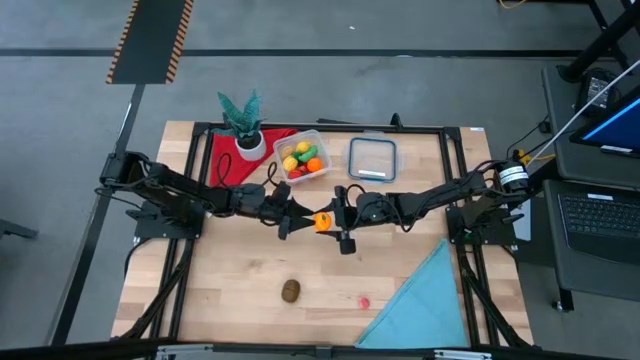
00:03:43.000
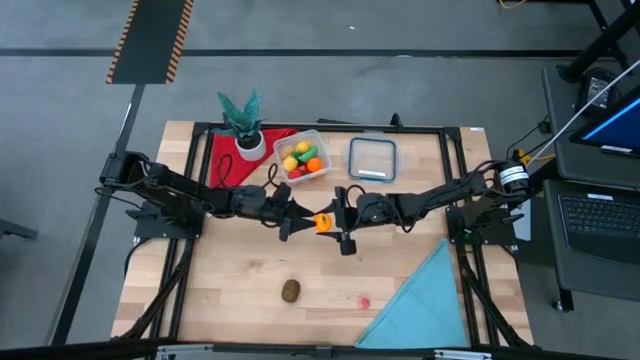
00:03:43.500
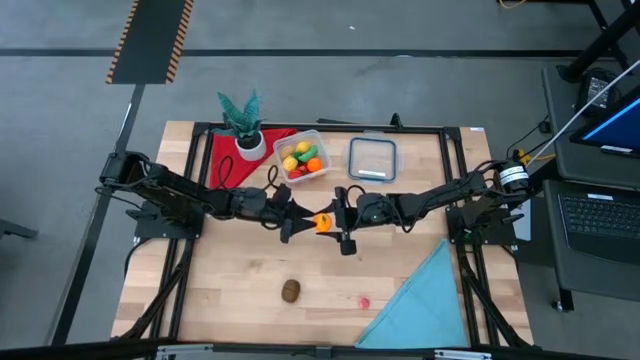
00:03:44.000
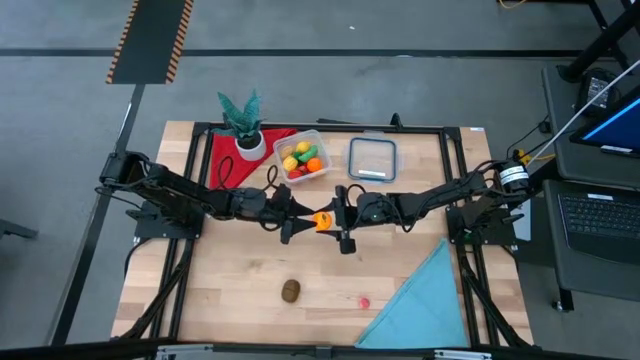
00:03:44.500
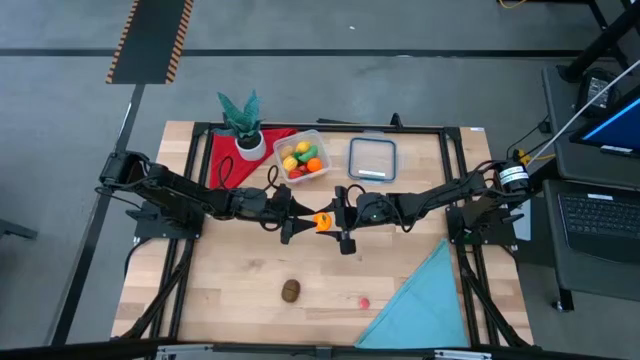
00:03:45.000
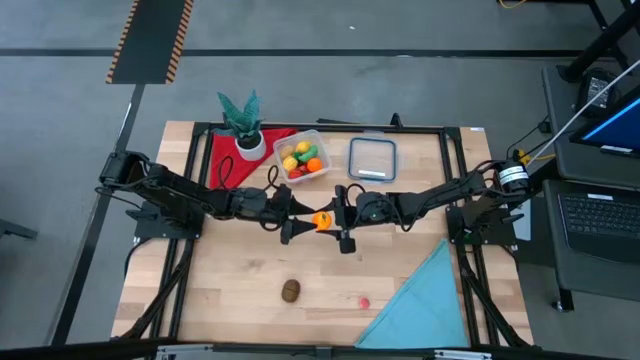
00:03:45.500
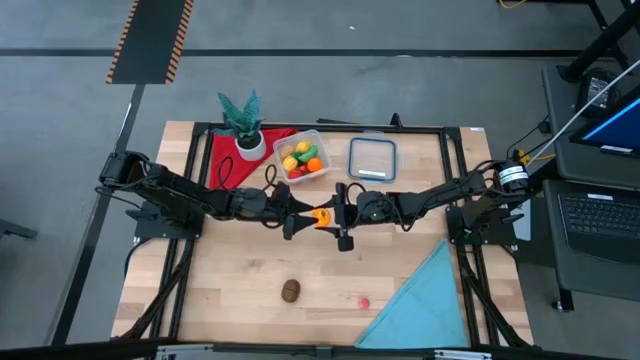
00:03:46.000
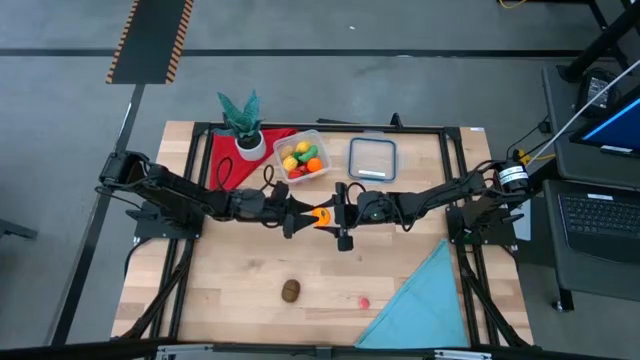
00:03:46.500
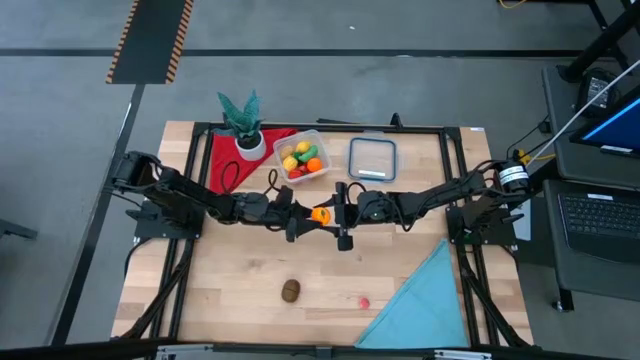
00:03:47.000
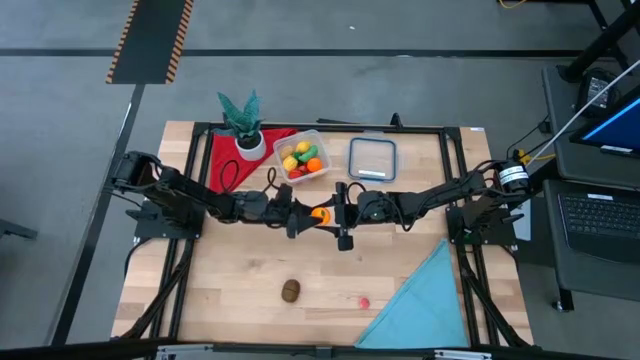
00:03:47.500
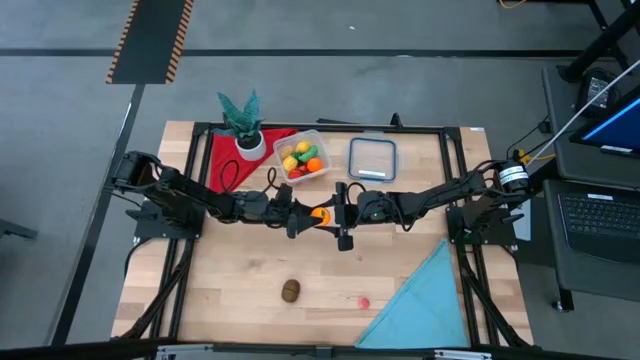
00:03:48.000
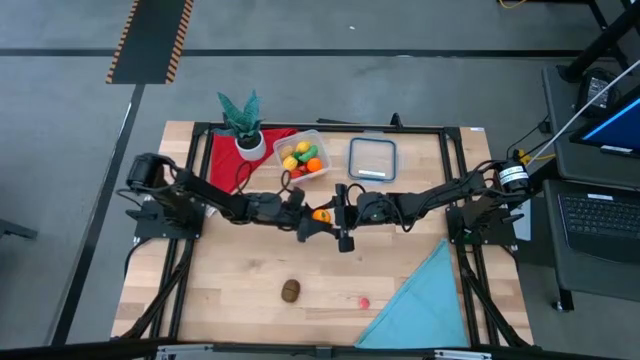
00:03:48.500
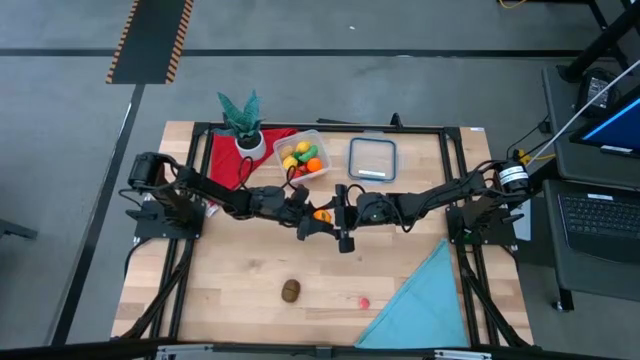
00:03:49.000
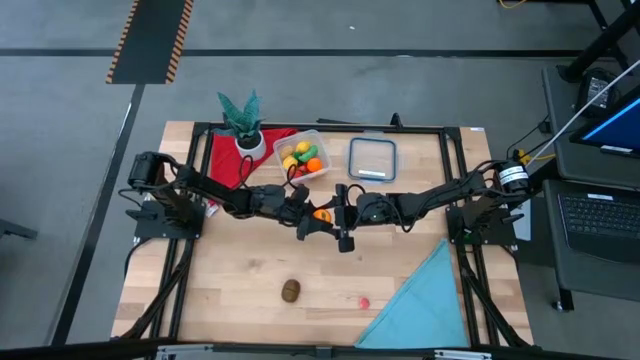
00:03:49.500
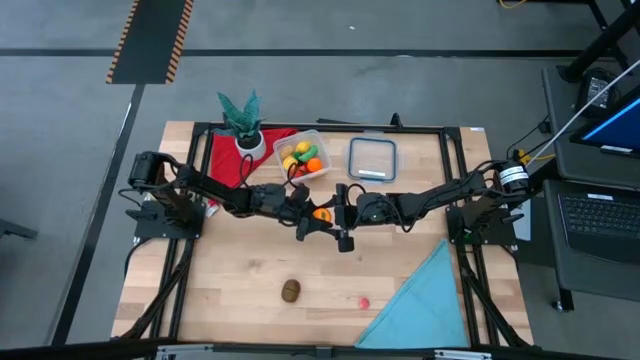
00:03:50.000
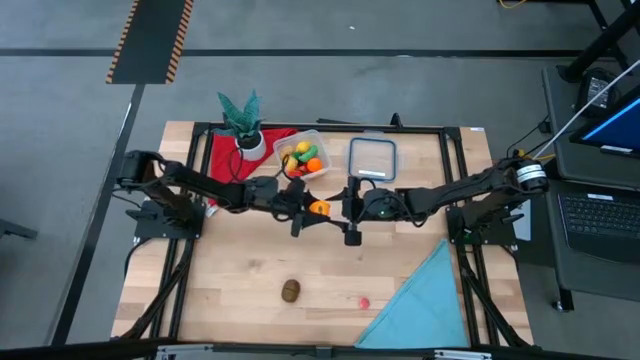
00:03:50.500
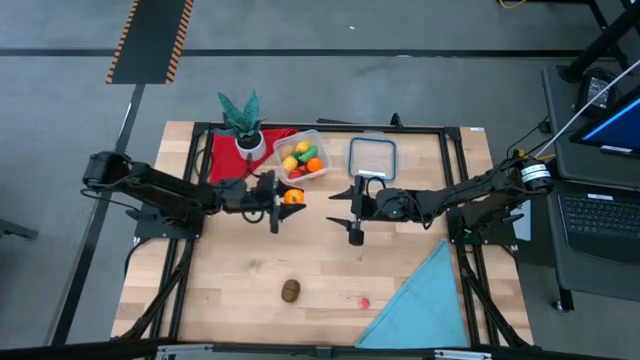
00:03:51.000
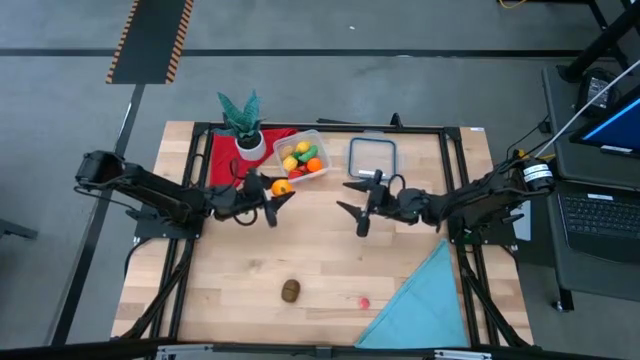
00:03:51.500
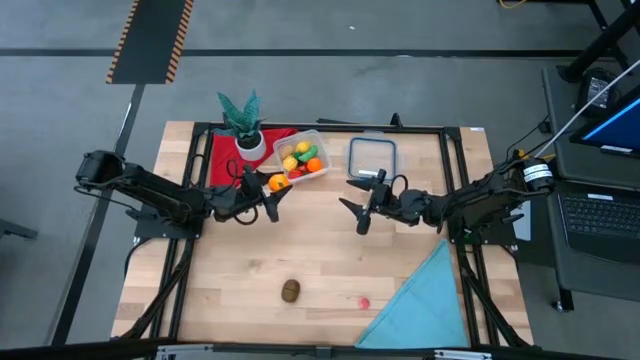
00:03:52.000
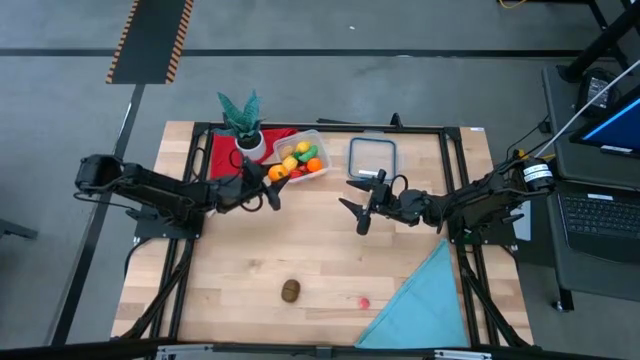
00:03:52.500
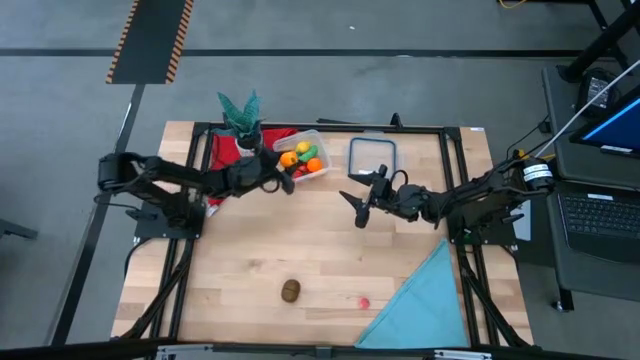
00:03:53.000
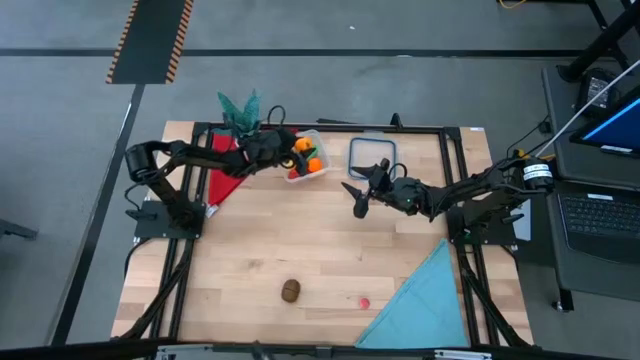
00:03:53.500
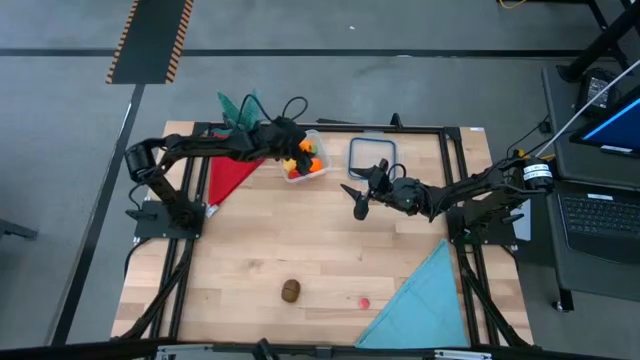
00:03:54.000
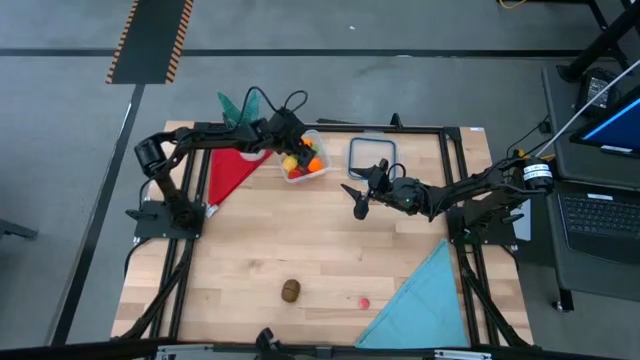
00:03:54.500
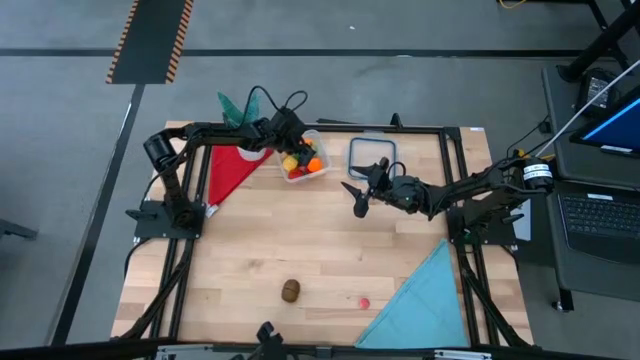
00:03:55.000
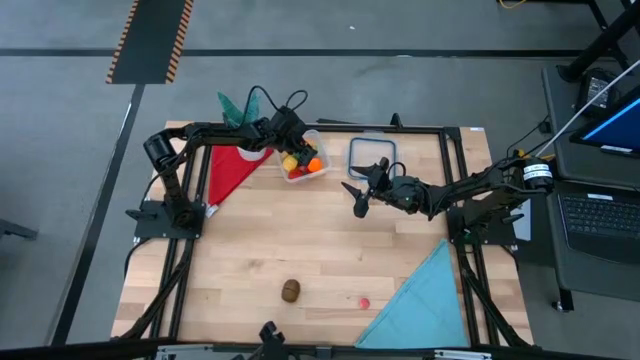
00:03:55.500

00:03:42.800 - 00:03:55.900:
Task: Pick and placing Produce into tupperware
Put the orange into the transparent bin

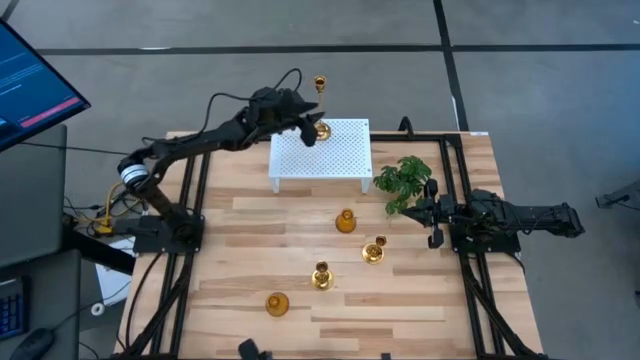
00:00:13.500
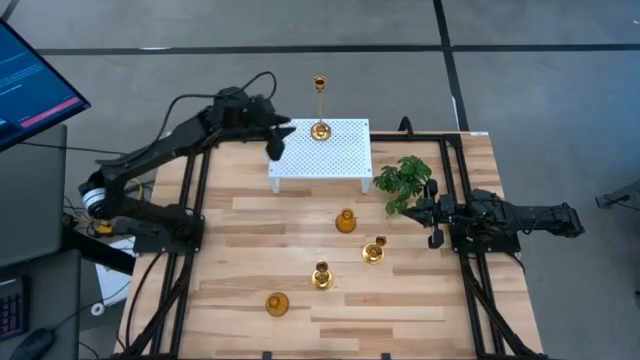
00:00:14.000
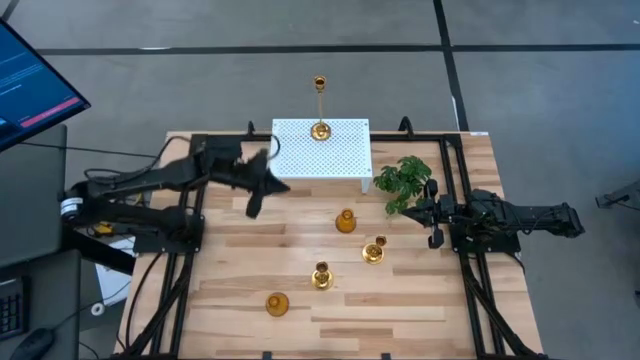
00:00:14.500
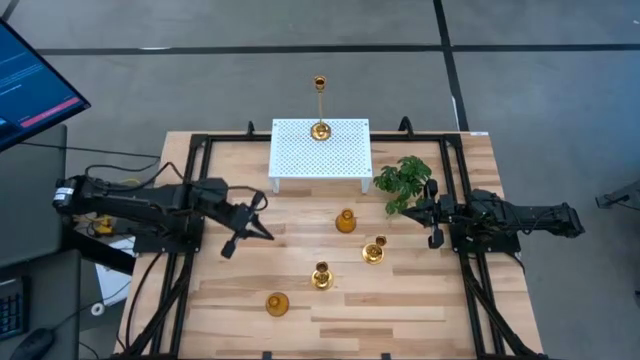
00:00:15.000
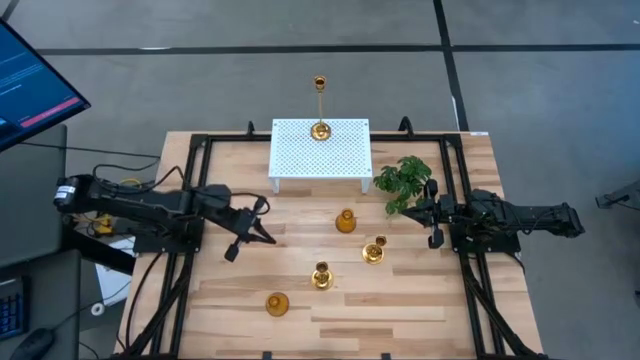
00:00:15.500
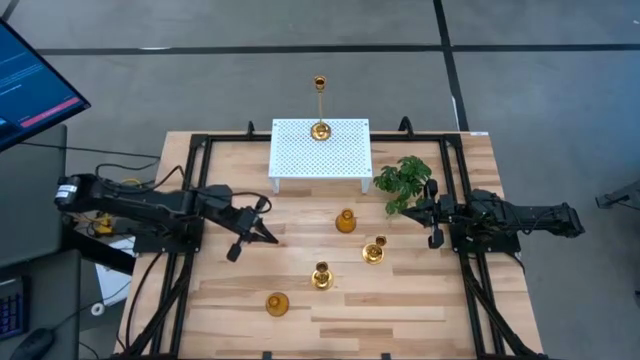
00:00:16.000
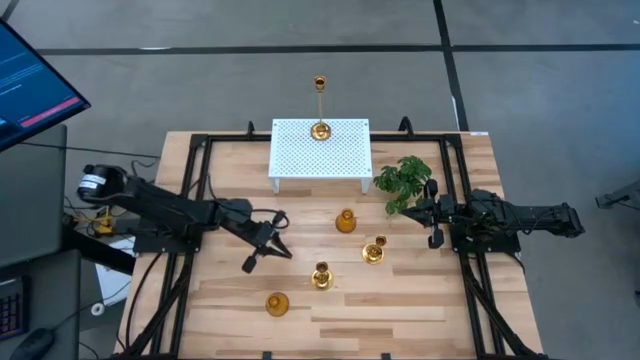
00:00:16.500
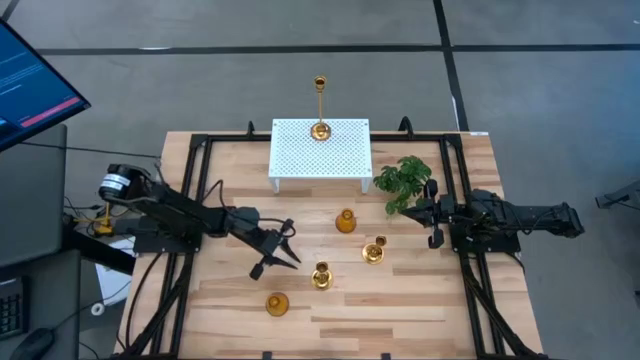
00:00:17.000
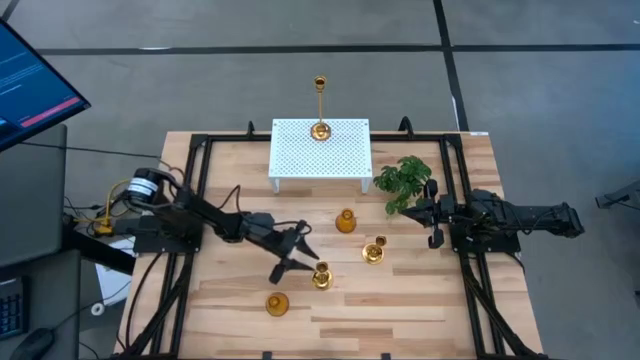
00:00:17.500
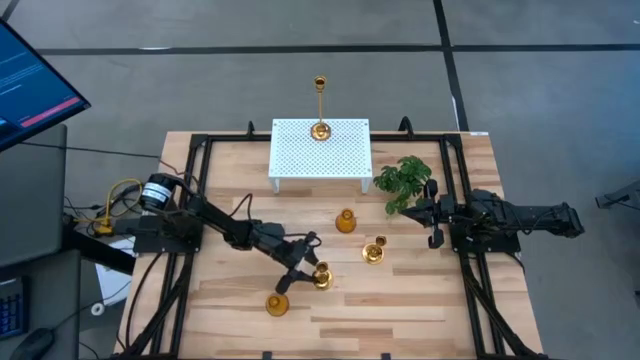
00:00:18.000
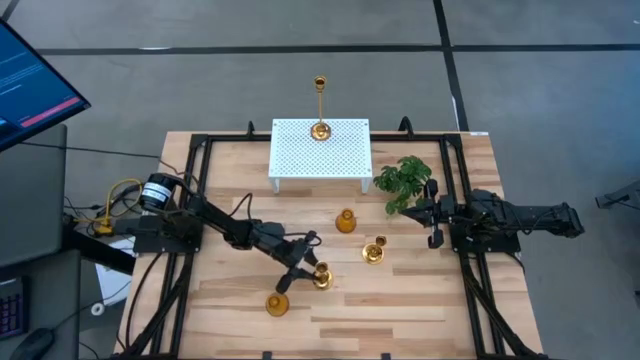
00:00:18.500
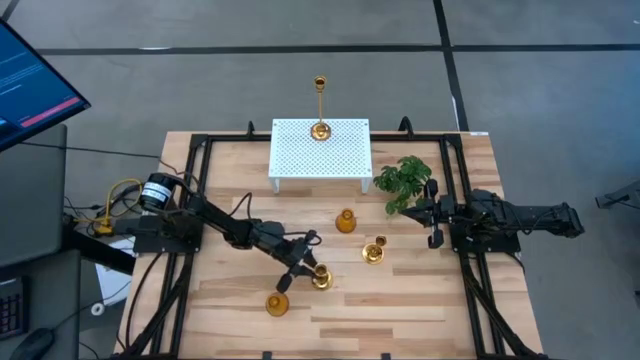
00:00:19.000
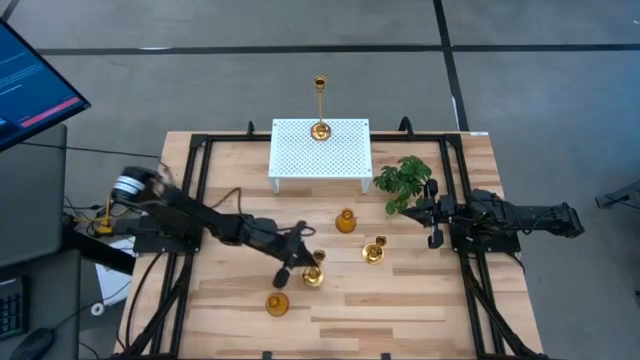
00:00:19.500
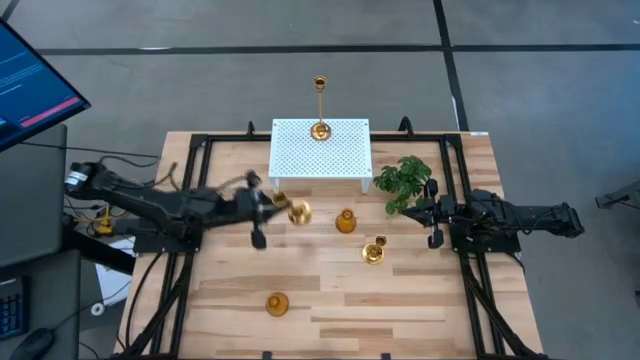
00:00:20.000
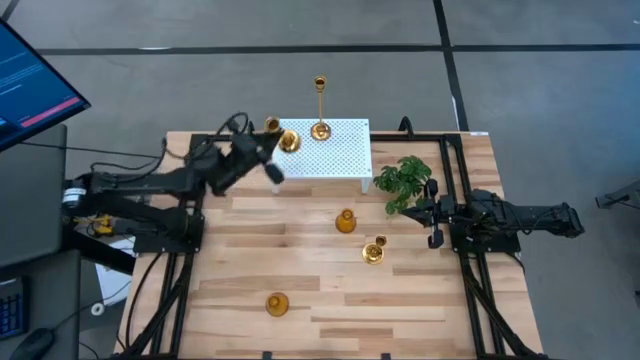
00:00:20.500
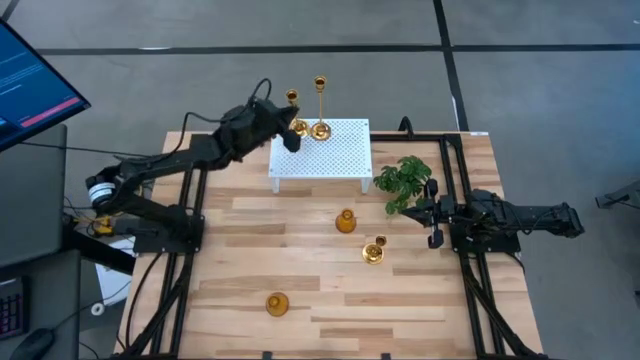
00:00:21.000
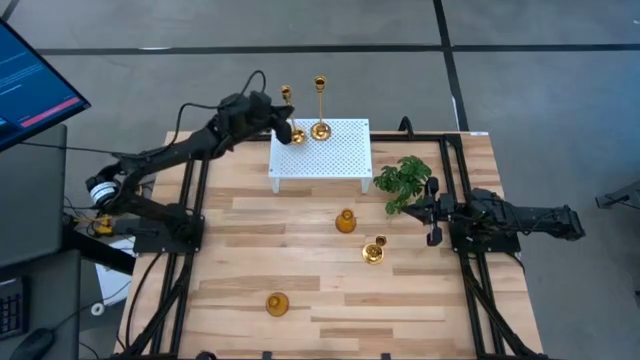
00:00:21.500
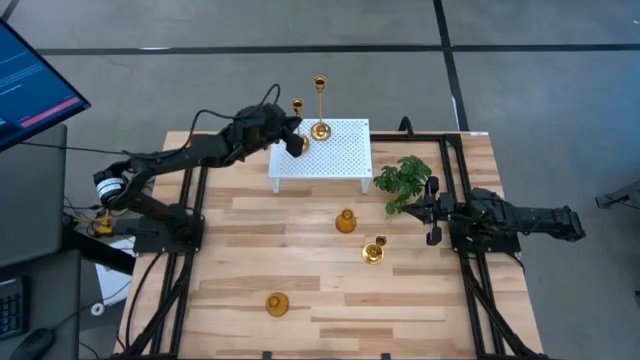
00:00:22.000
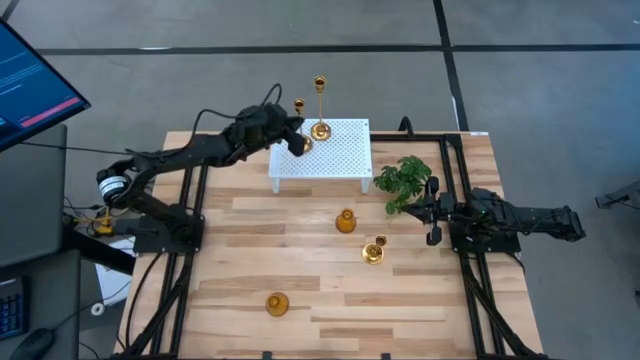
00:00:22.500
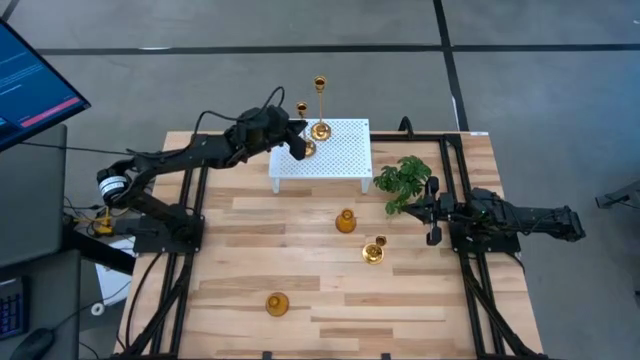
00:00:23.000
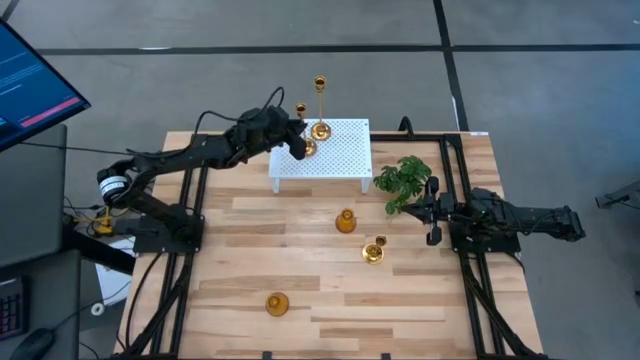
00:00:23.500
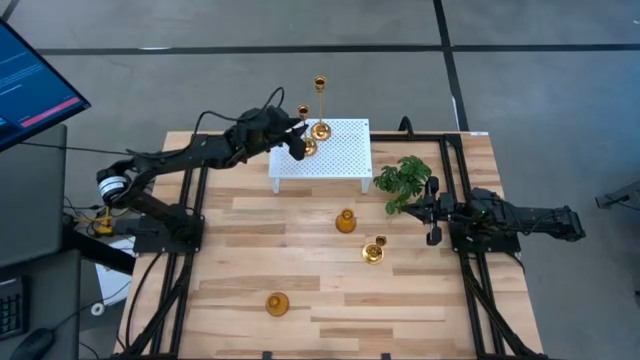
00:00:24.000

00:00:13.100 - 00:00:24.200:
Task: Pick & Place candle stick holders
Put the bottom gold candle holder on the shelf
